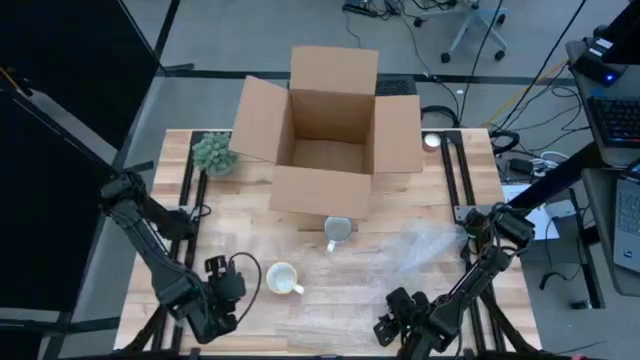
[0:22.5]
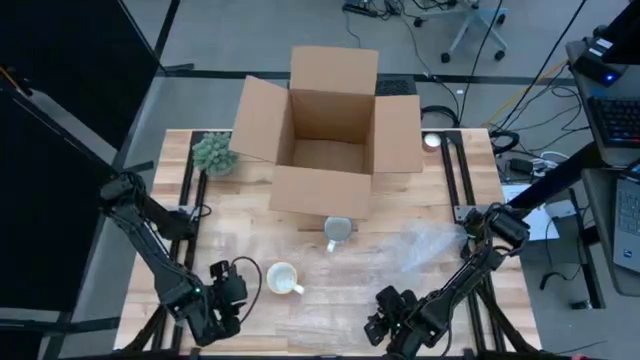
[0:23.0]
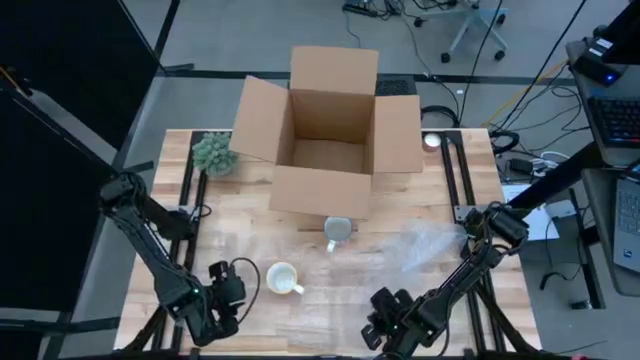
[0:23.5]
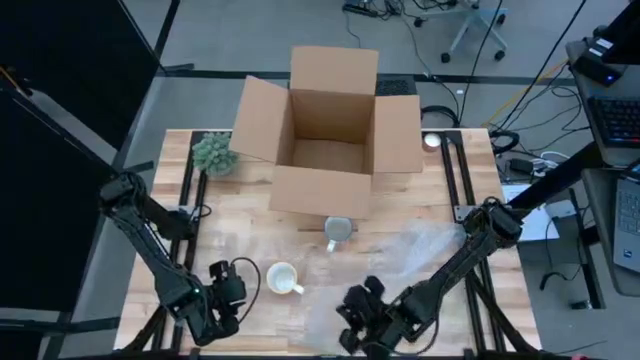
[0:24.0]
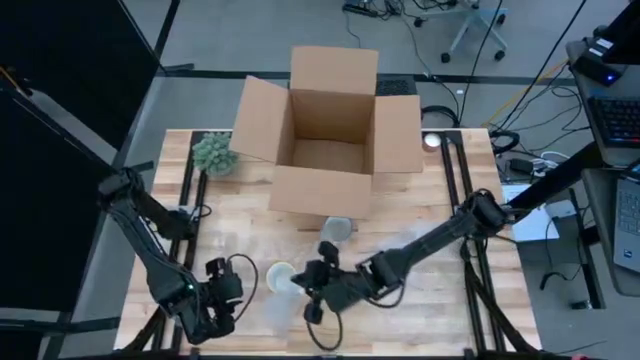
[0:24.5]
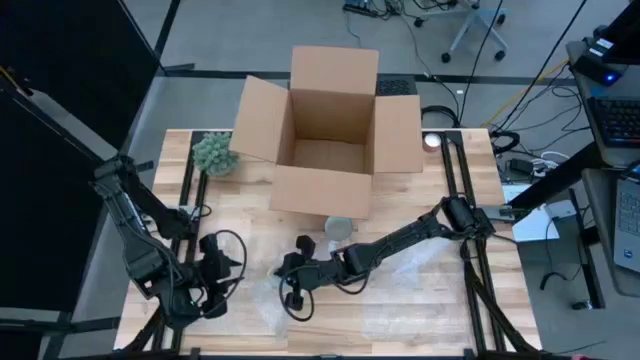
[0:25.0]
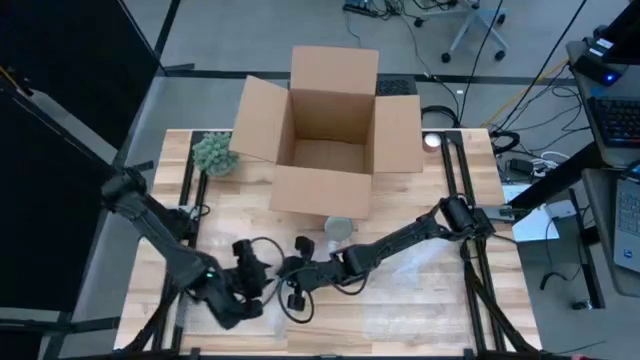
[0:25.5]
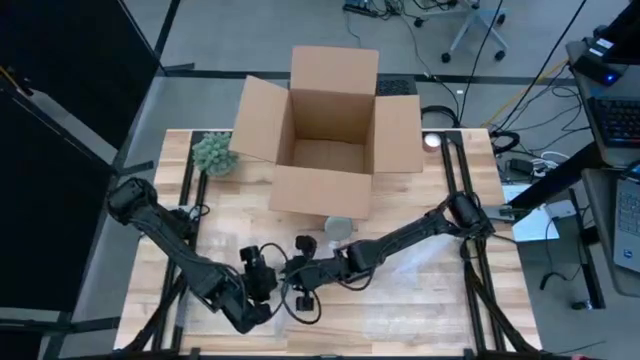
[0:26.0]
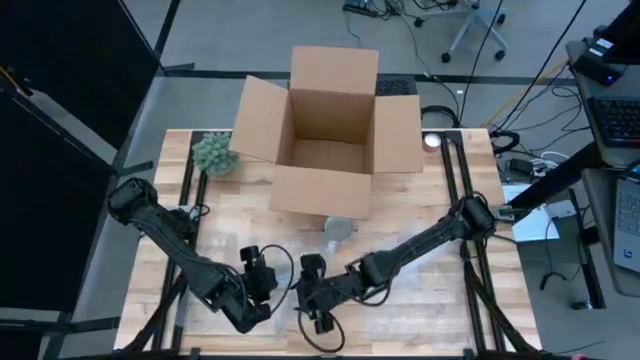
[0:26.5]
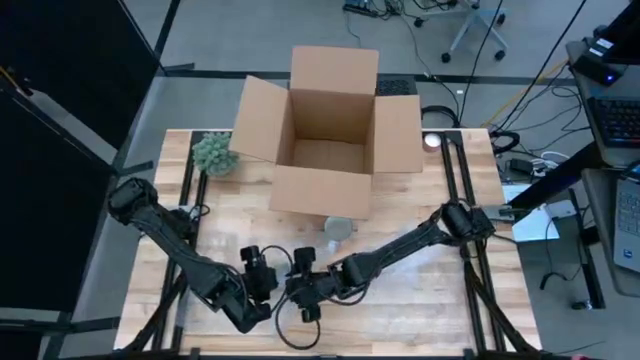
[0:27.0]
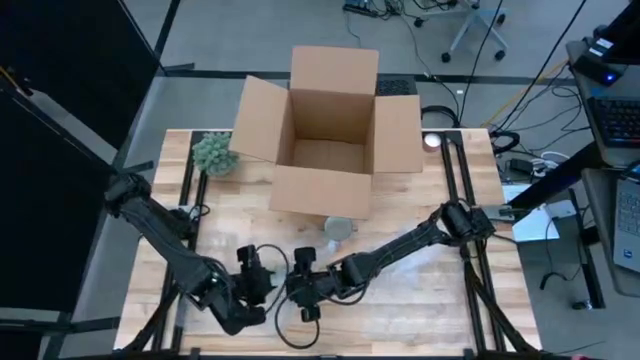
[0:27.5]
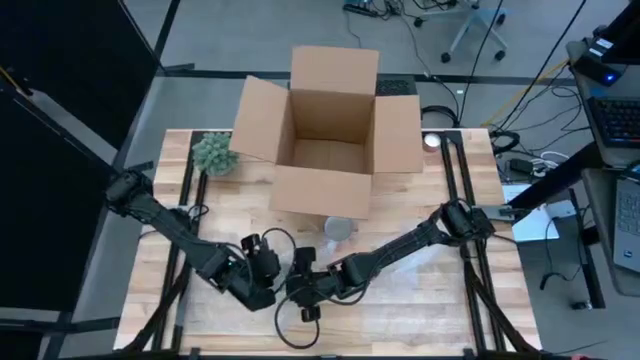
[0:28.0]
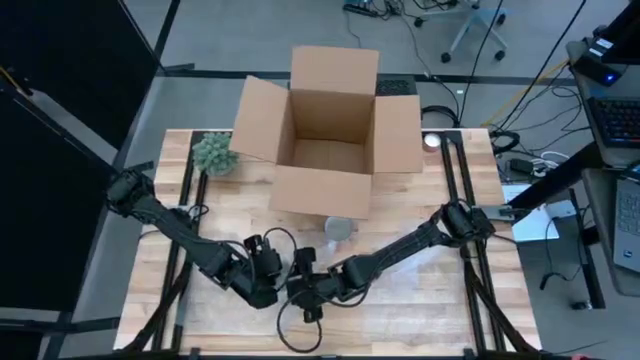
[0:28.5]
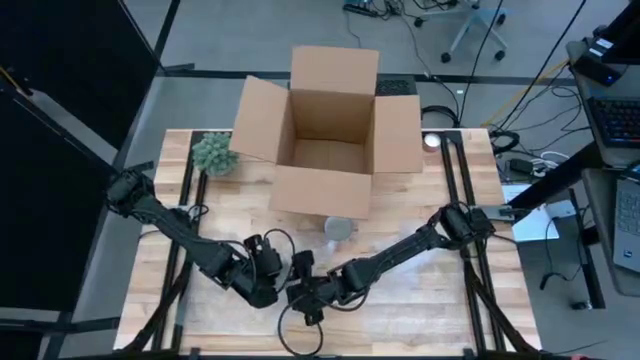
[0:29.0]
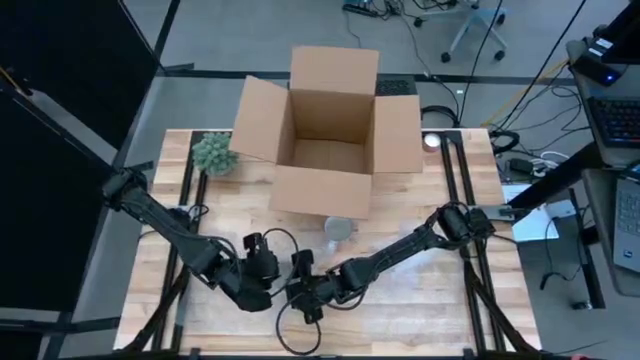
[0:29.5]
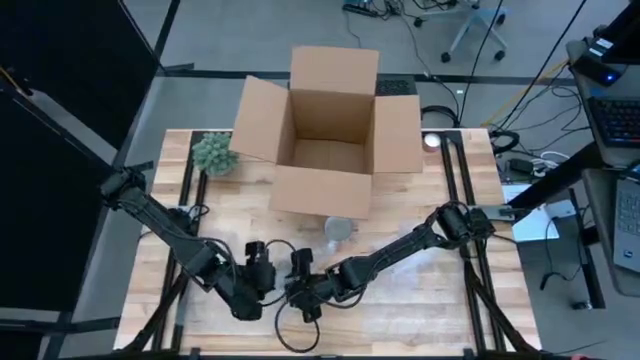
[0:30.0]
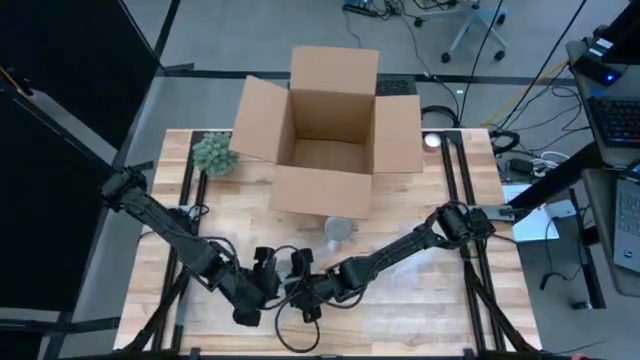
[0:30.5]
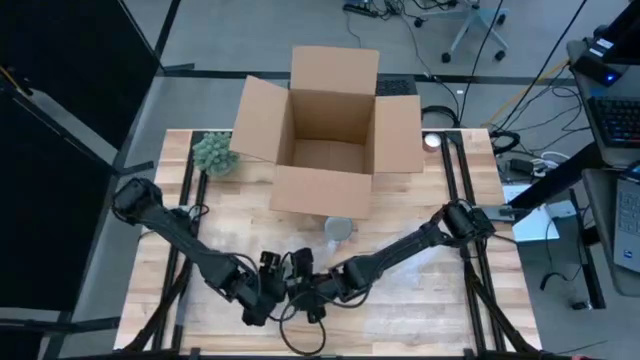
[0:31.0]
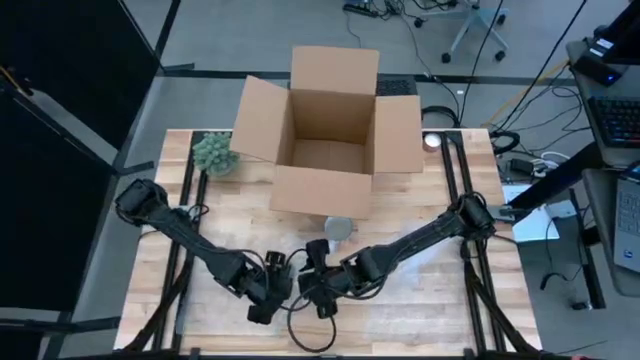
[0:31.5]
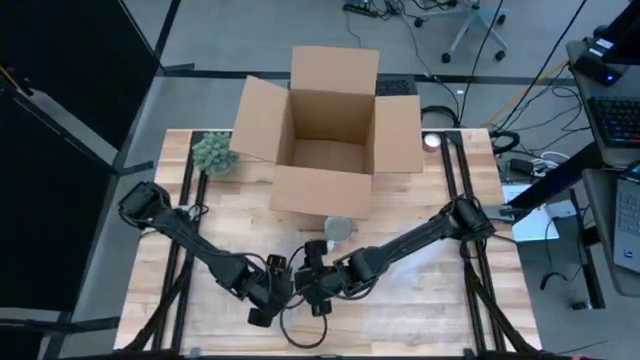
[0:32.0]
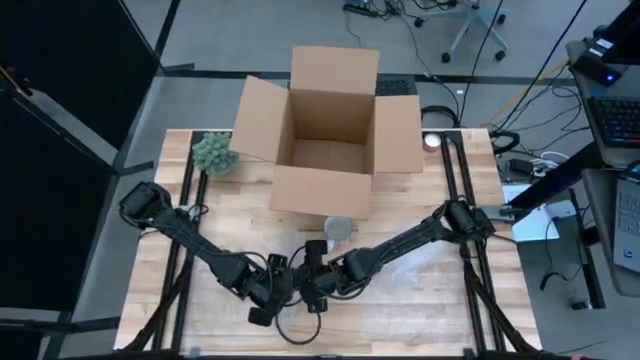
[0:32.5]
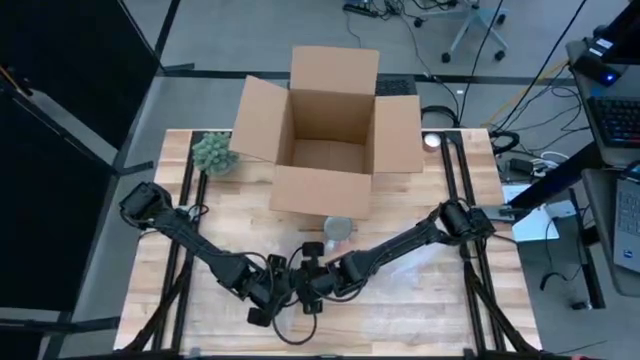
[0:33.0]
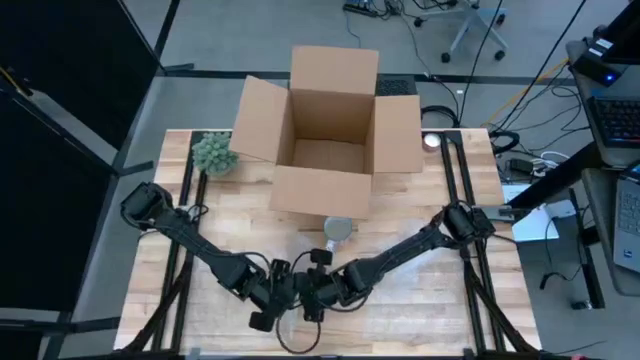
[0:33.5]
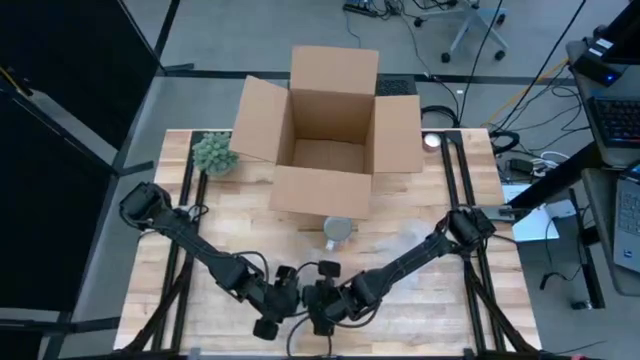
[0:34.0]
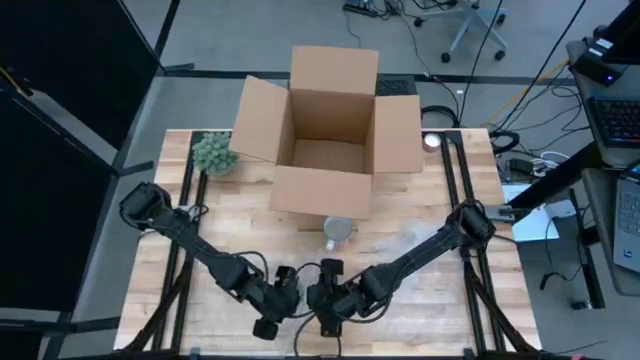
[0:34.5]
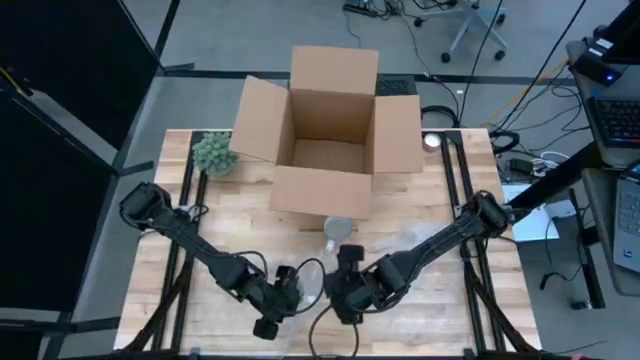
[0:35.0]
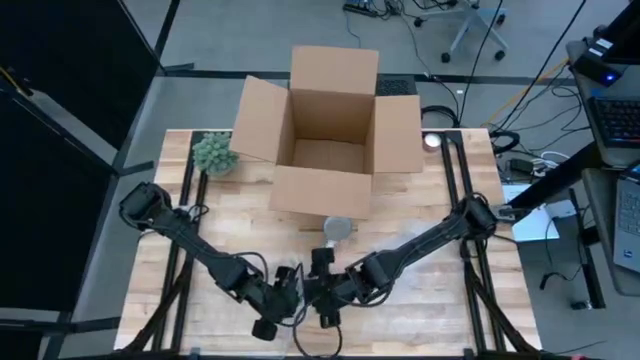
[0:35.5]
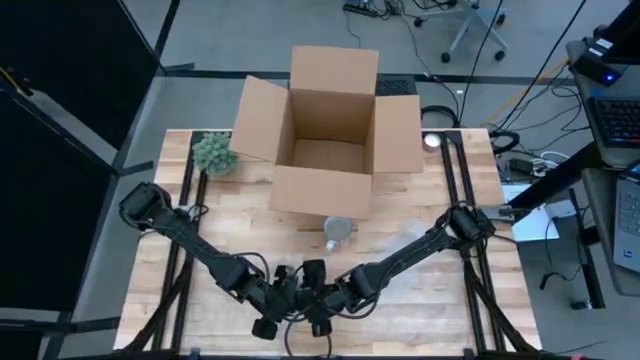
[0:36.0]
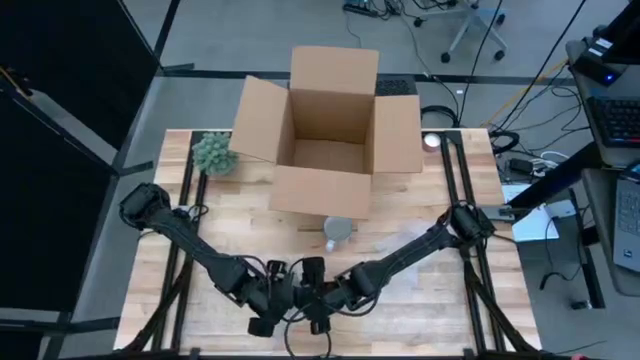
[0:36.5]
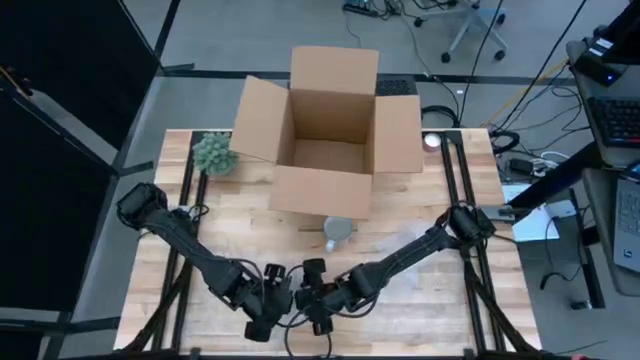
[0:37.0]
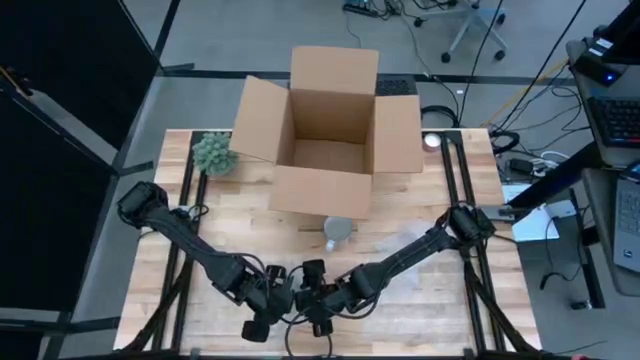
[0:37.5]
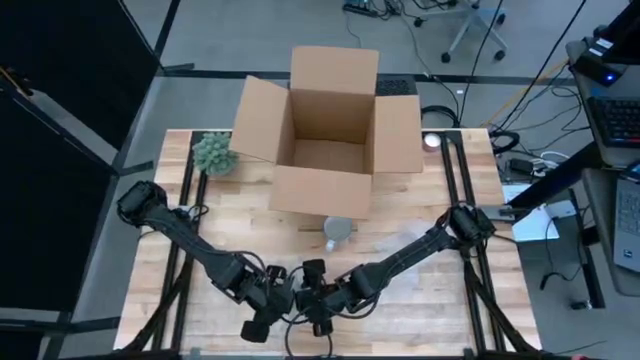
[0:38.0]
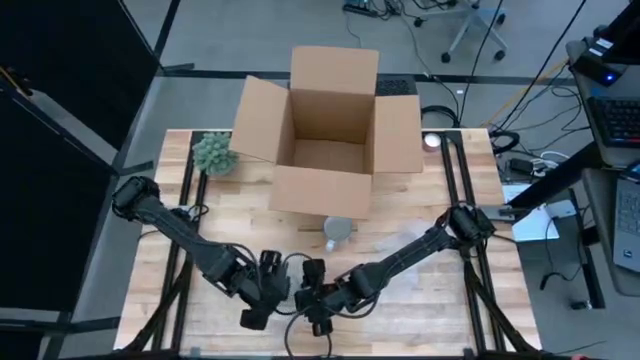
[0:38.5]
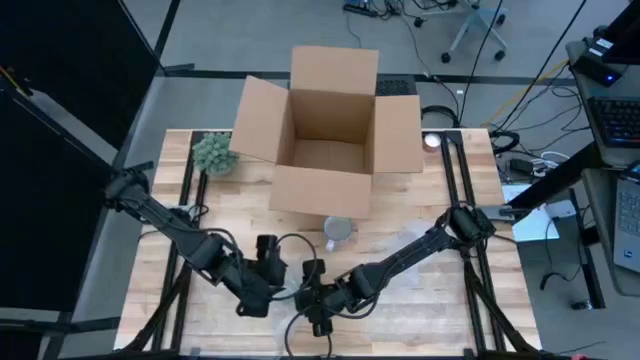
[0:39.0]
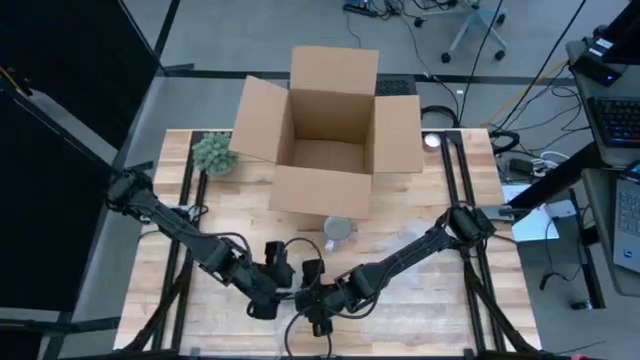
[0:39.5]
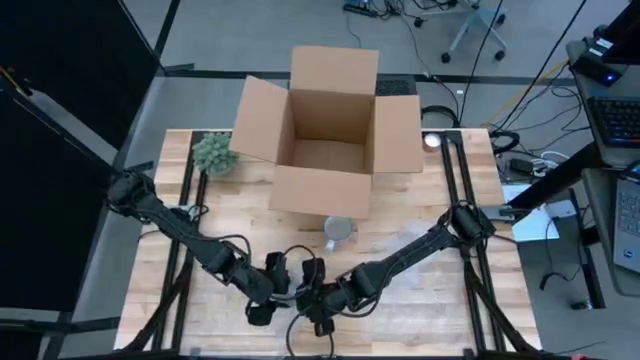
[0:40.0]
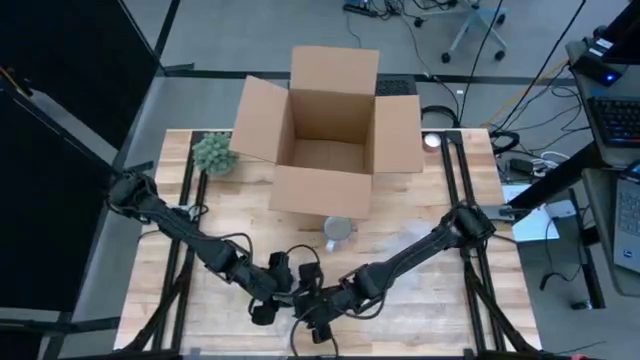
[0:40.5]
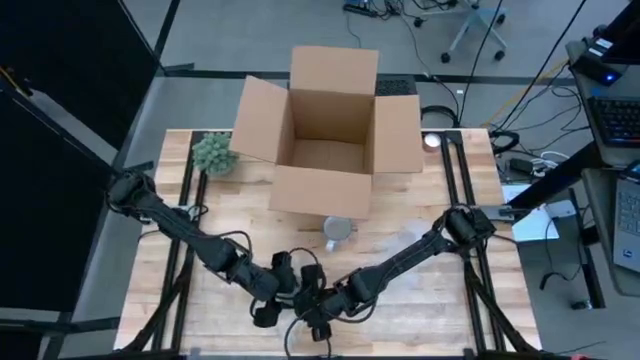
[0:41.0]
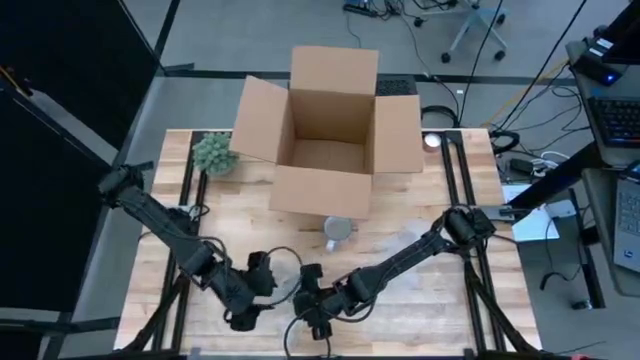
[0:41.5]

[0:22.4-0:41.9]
Task: wrap mug
Wrap the orange mug with bubble wrap
